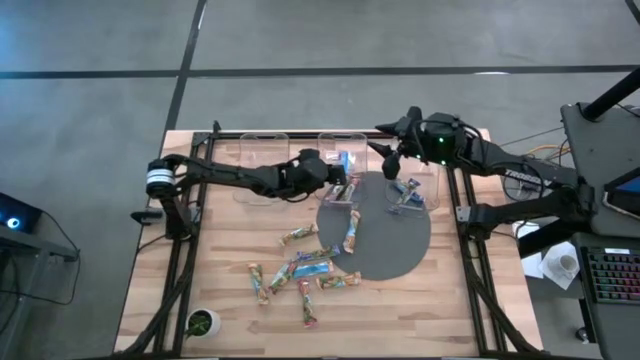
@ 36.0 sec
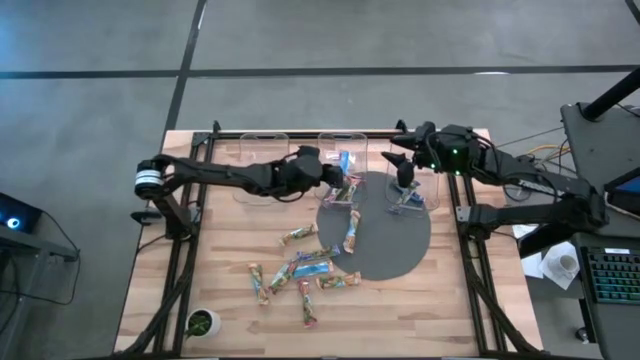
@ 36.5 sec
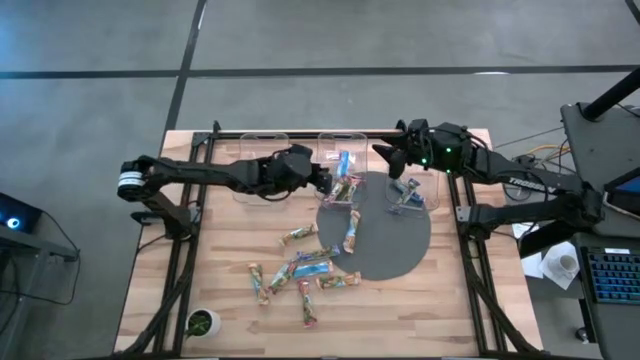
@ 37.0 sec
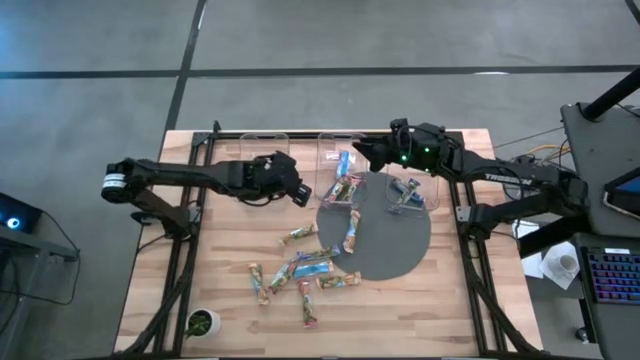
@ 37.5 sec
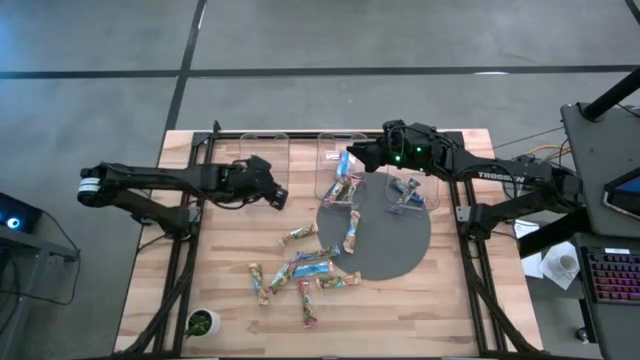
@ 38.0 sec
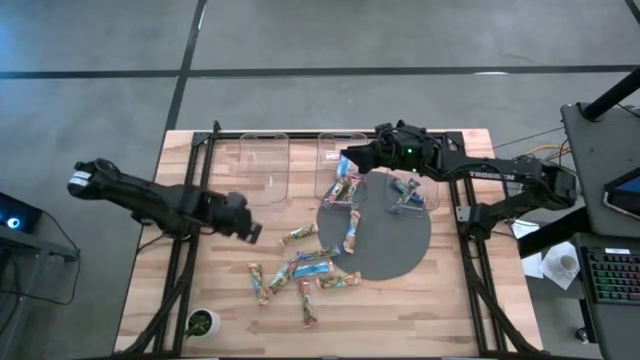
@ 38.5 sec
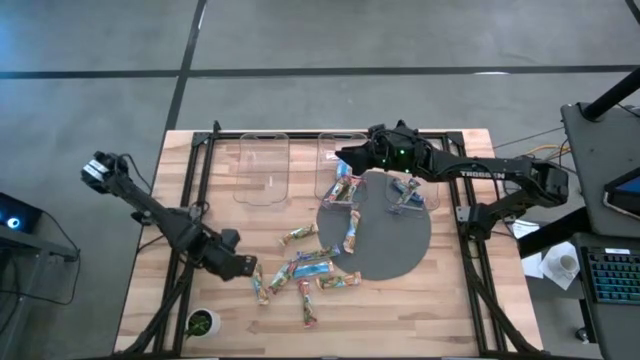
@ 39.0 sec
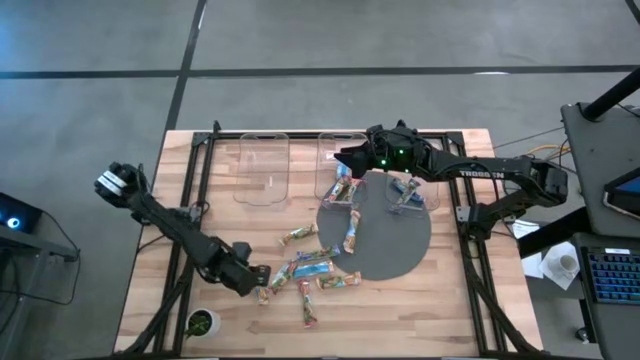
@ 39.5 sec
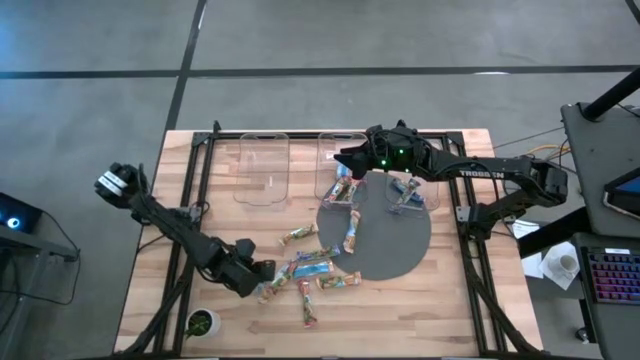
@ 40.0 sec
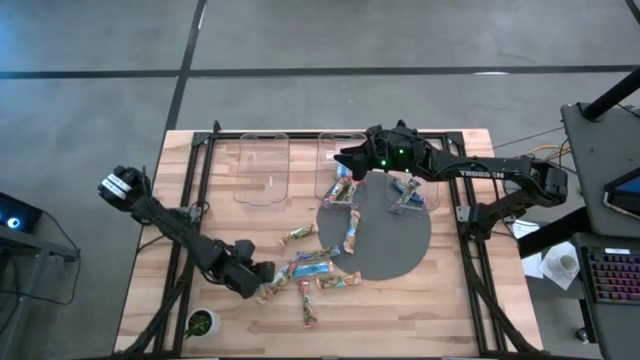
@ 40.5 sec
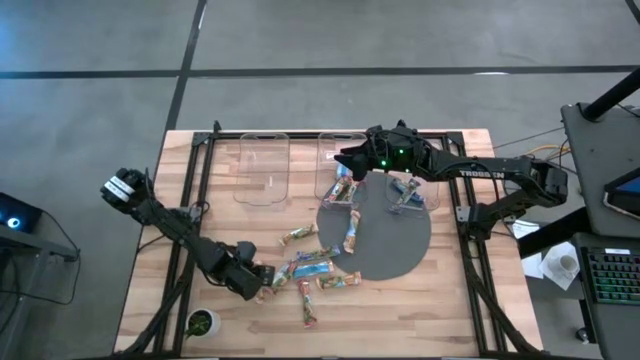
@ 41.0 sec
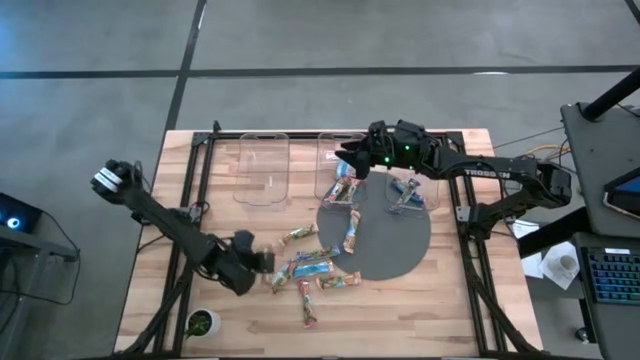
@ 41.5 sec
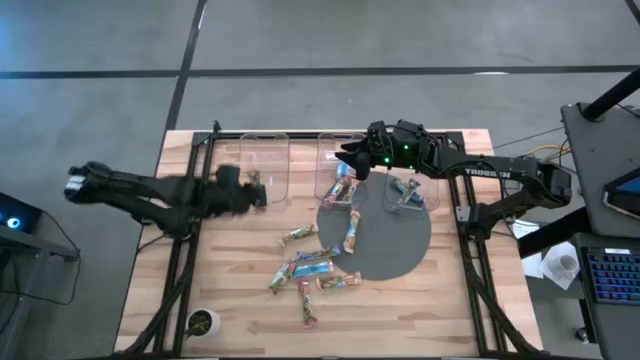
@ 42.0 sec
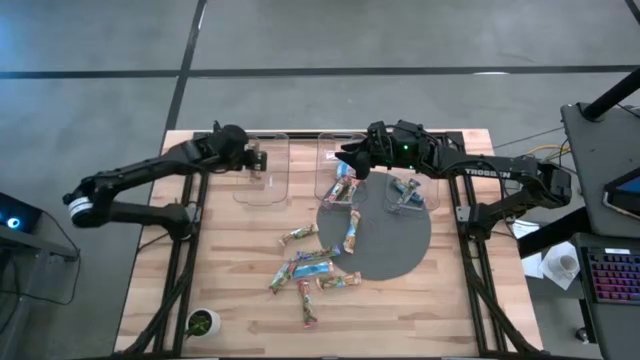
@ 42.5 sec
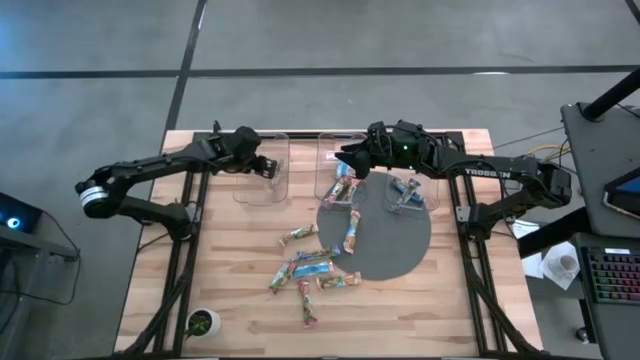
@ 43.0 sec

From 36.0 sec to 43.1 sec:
Task: Pick and place Granola Bars by type
Put the yellow granola bar into the left transparent bin

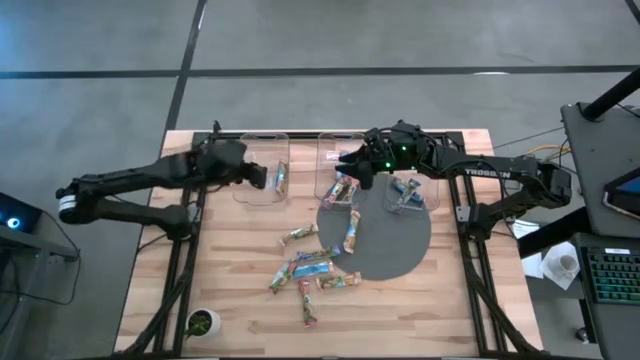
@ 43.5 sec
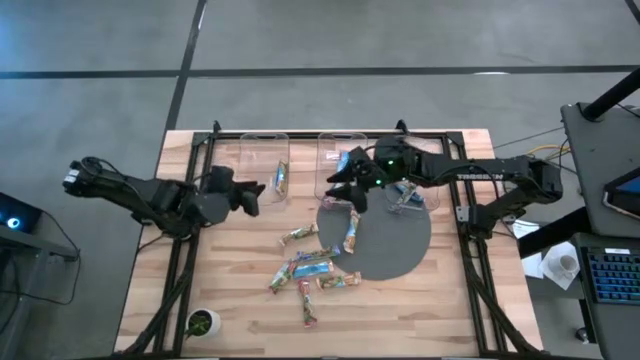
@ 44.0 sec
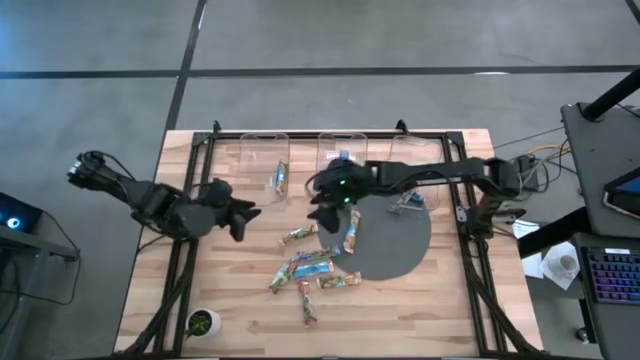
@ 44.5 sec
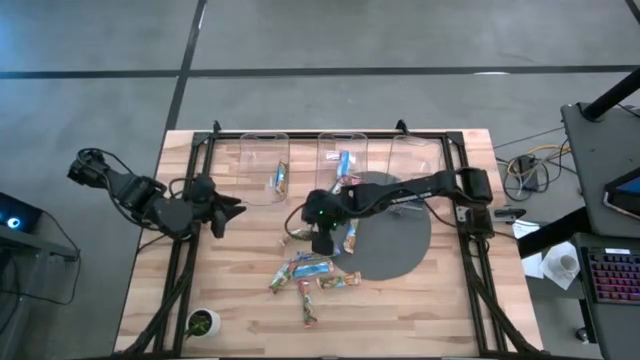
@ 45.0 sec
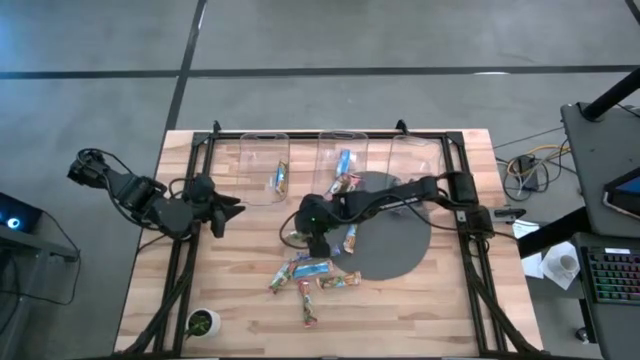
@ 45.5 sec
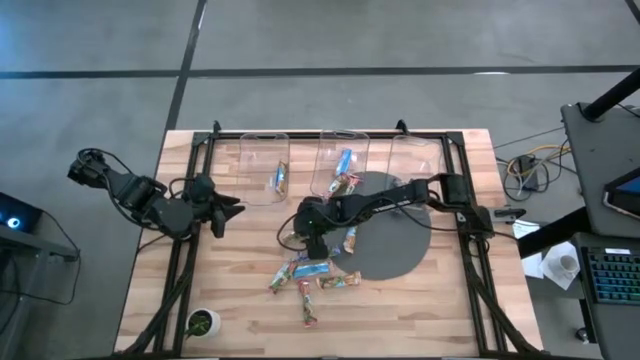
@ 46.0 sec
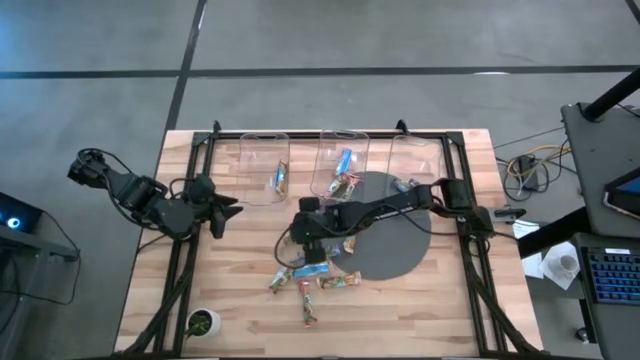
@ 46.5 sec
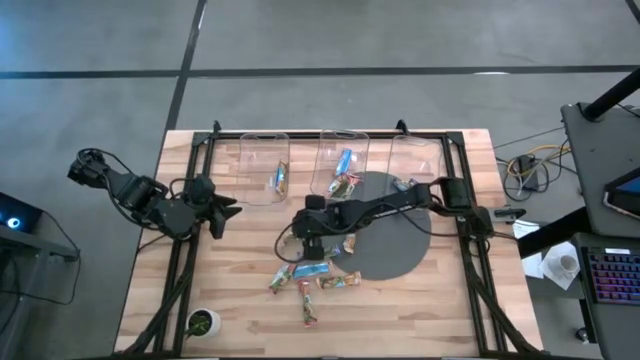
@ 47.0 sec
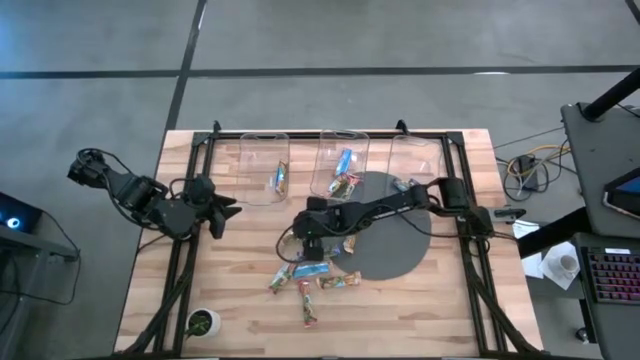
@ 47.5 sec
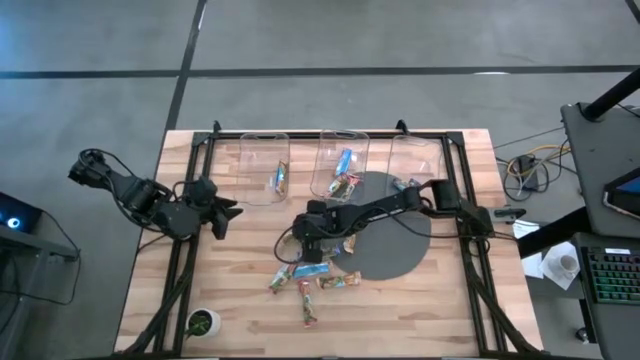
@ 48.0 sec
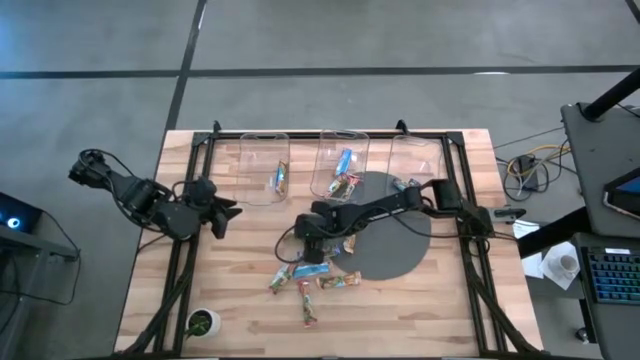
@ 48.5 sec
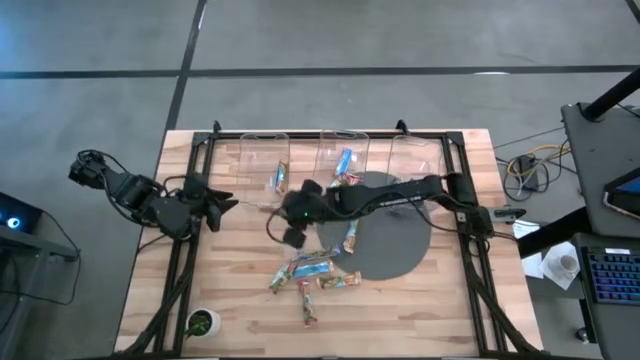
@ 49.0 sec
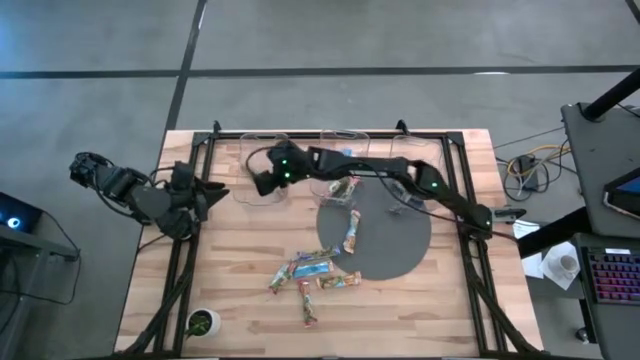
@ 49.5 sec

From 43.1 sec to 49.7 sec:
Put the yellow granola bar into the left transparent bin

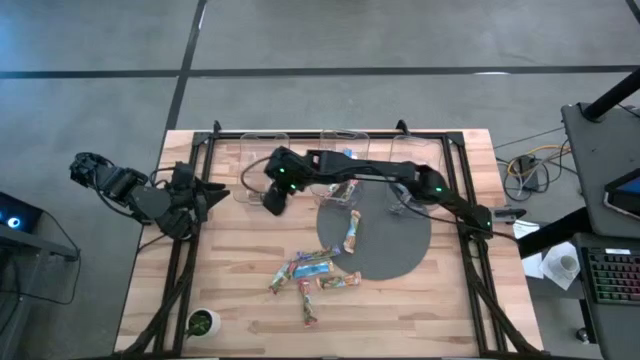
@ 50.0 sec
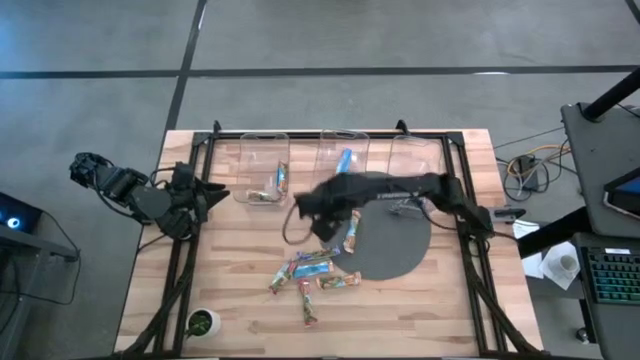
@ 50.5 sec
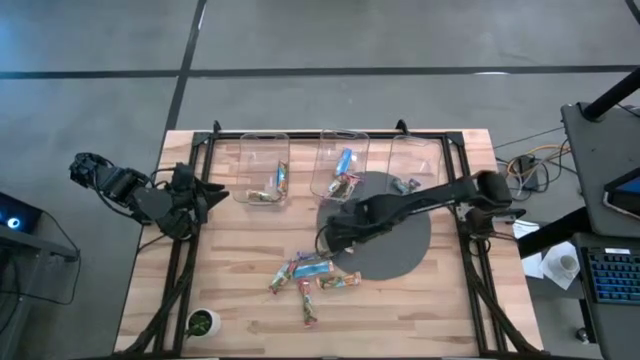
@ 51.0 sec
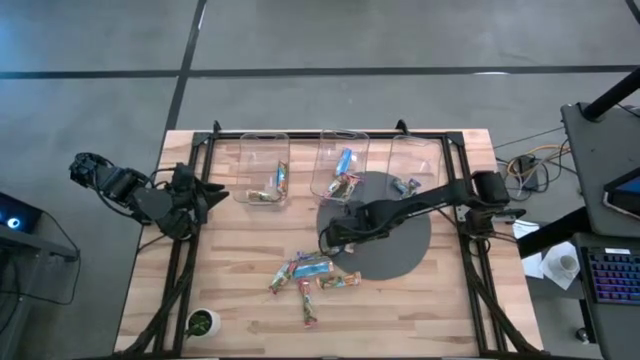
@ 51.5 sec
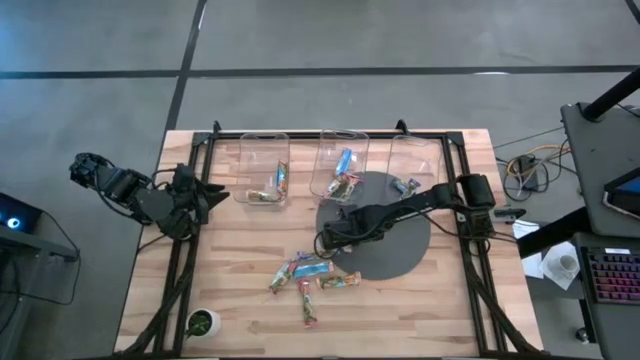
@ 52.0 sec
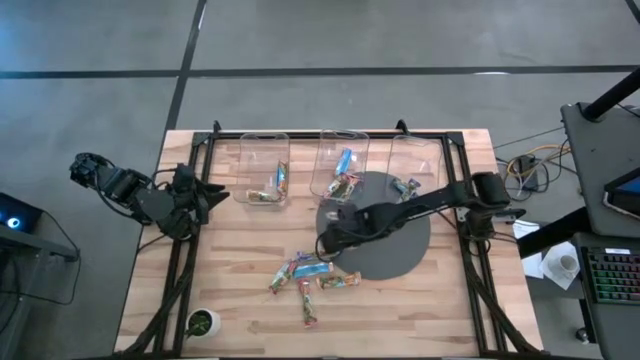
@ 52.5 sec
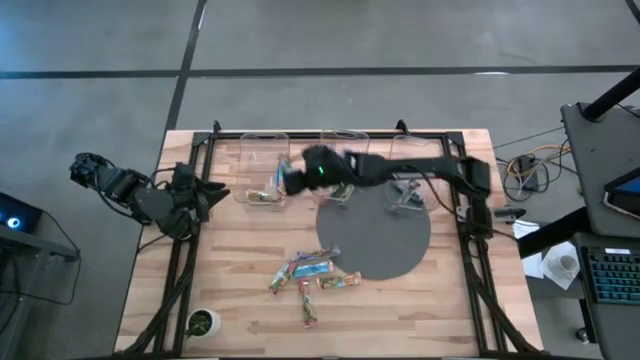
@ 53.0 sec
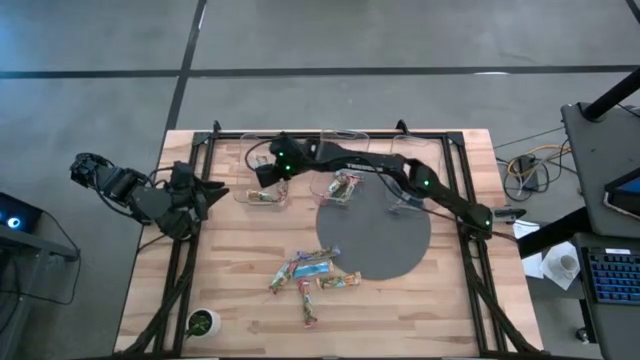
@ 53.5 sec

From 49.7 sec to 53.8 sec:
Put the yellow granola bar into the left transparent bin

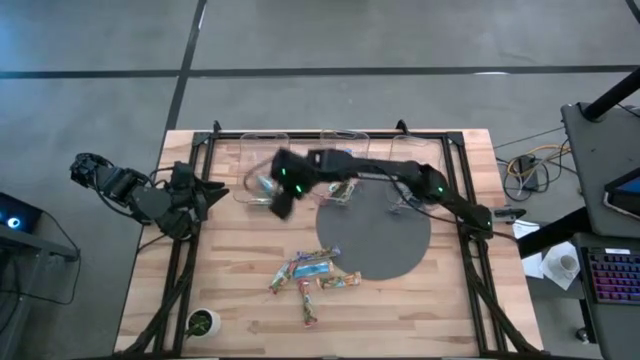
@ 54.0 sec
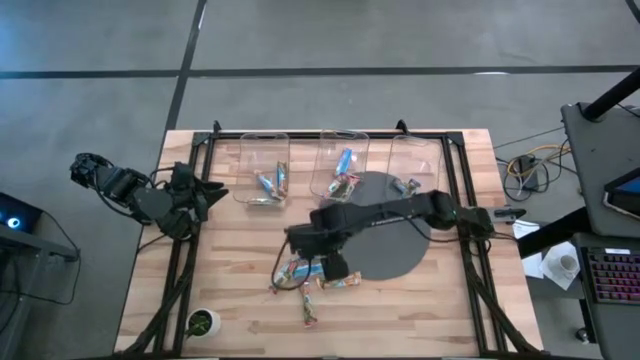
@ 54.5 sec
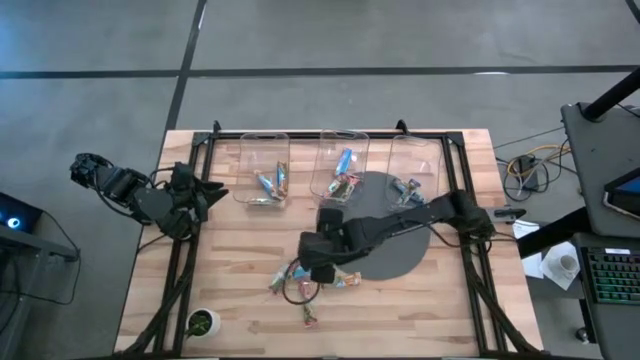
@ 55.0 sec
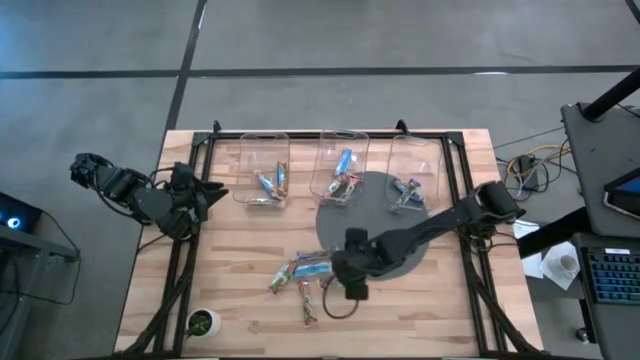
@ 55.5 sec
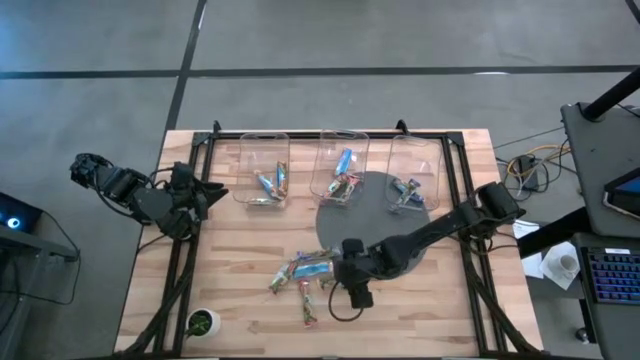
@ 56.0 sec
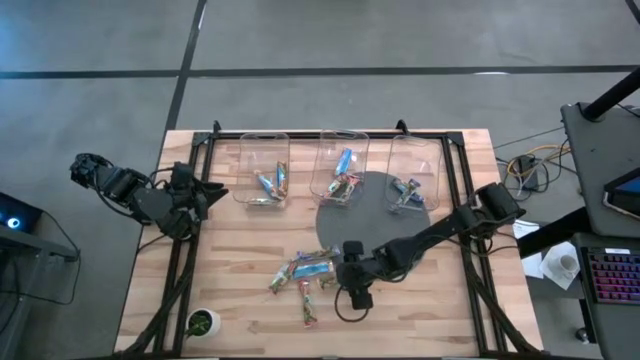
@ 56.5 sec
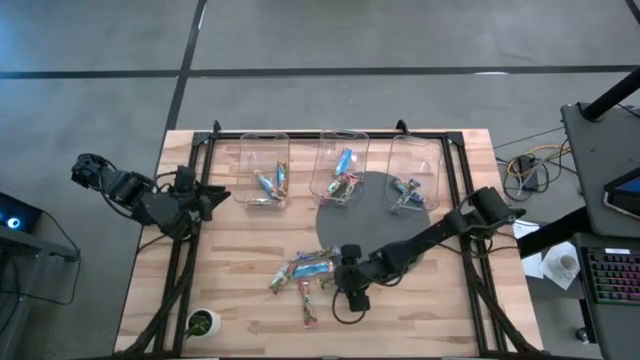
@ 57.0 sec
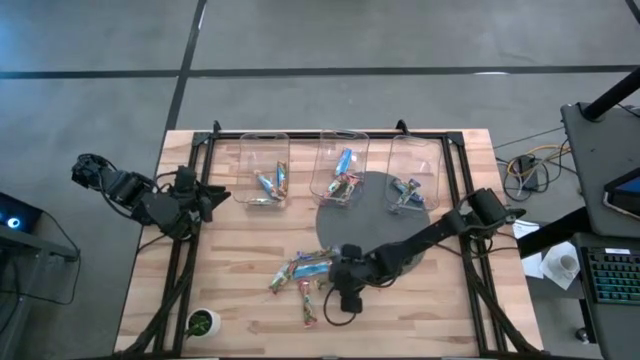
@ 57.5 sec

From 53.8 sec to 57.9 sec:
Put the yellow granola bar into the left transparent bin
